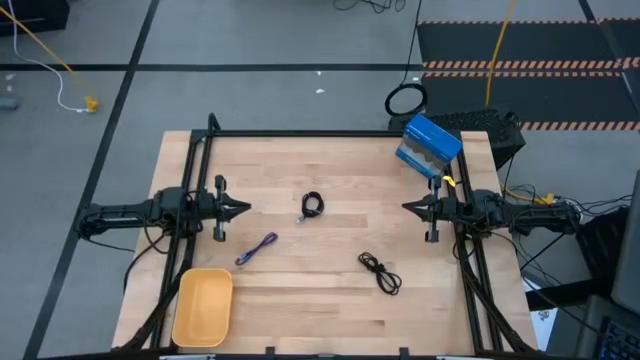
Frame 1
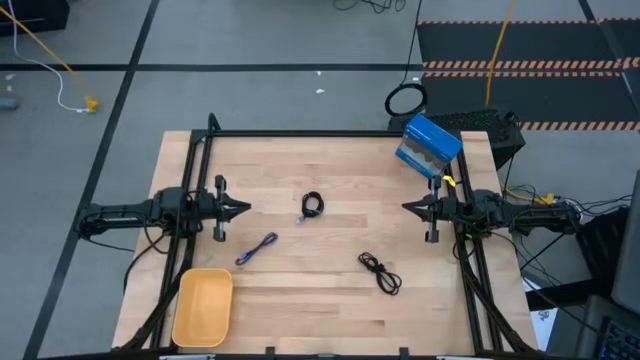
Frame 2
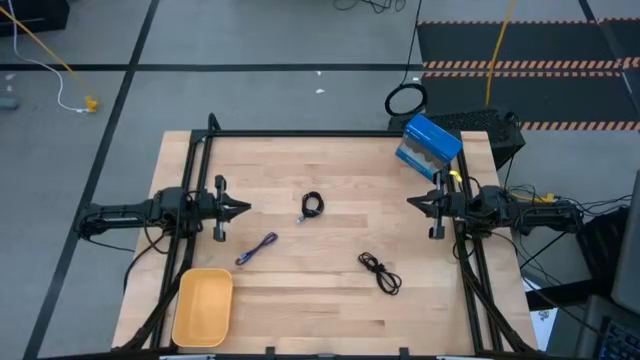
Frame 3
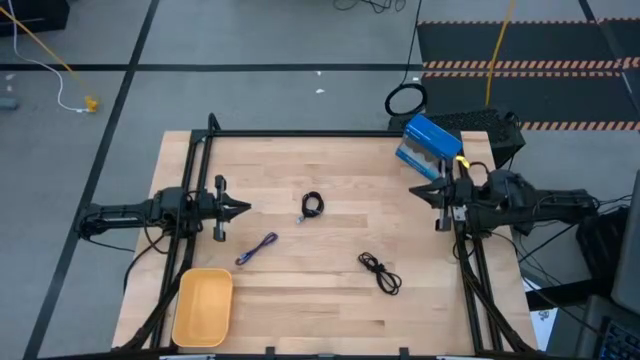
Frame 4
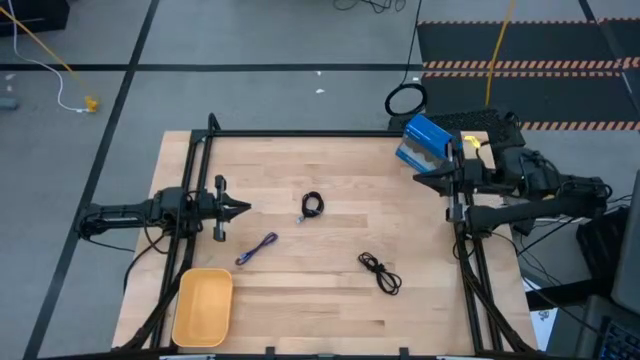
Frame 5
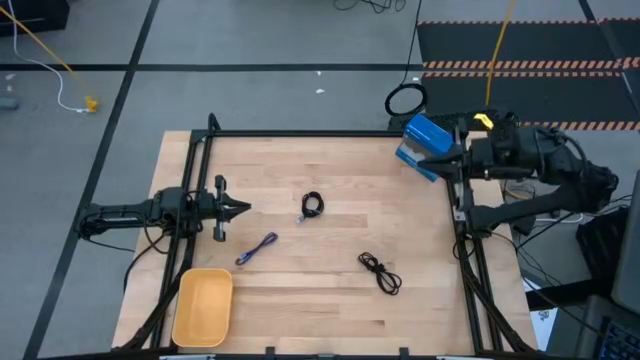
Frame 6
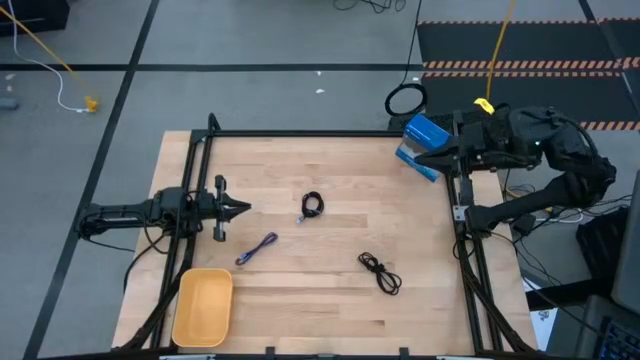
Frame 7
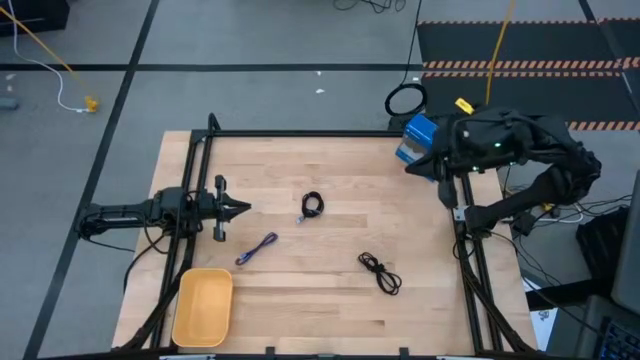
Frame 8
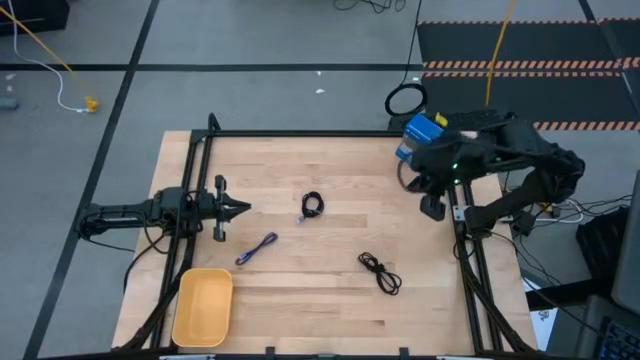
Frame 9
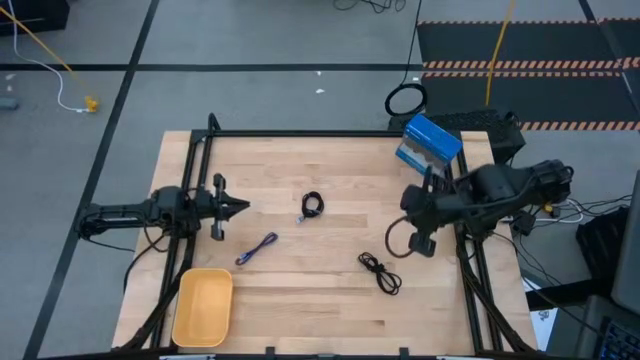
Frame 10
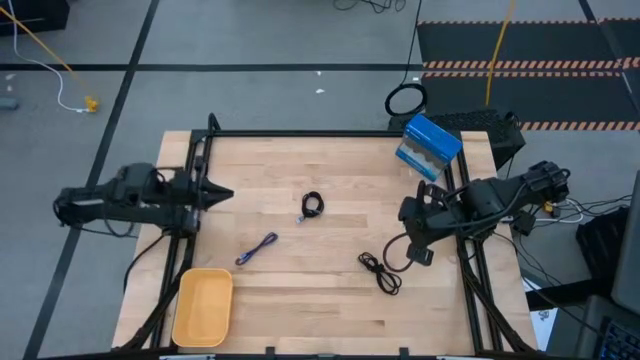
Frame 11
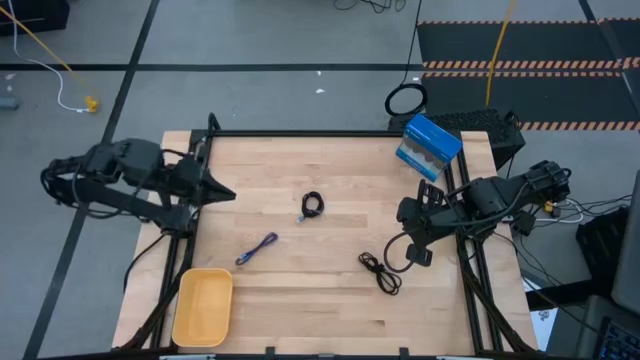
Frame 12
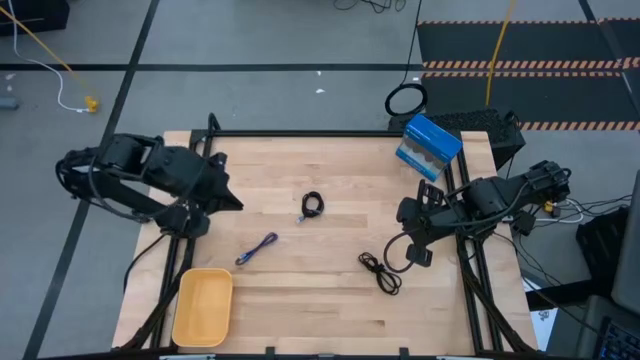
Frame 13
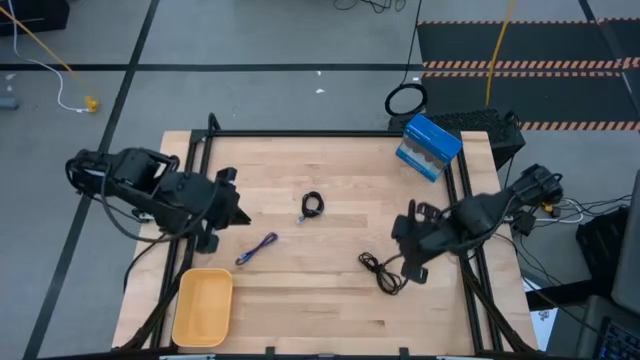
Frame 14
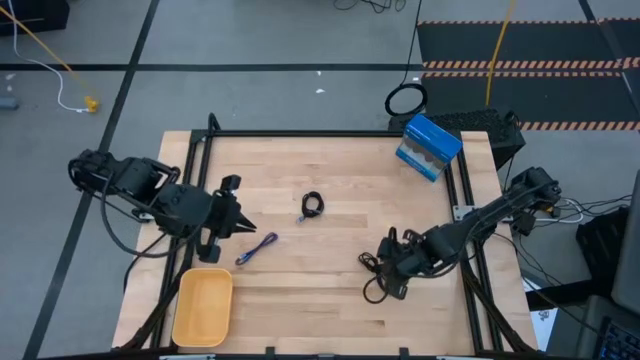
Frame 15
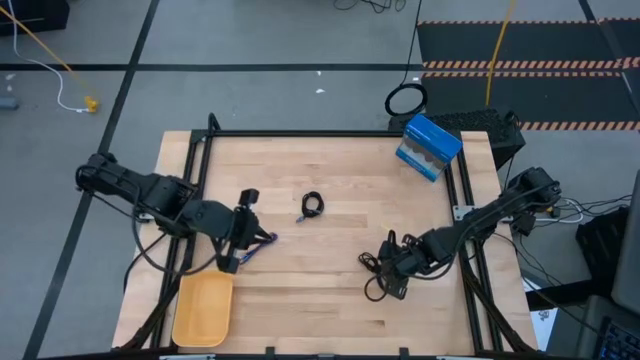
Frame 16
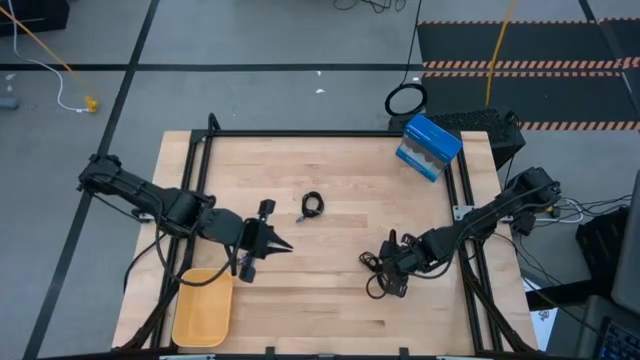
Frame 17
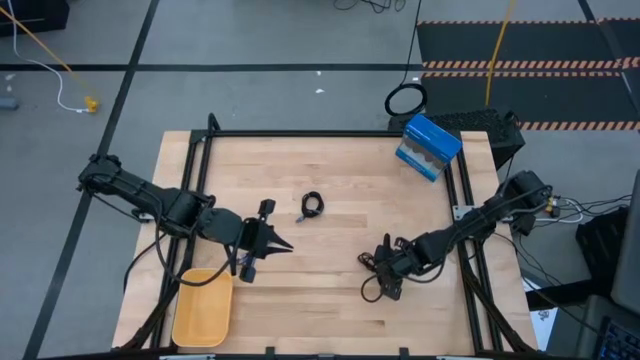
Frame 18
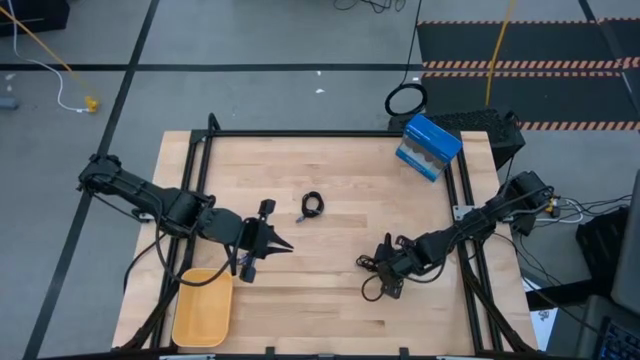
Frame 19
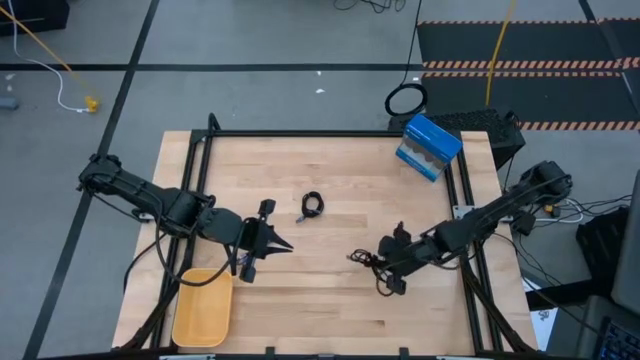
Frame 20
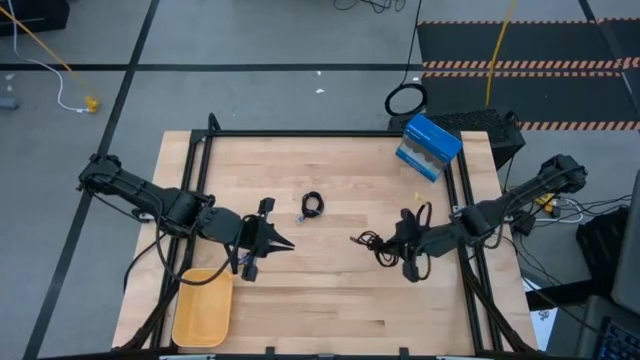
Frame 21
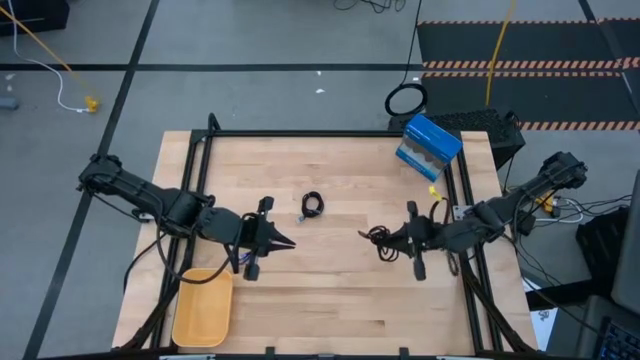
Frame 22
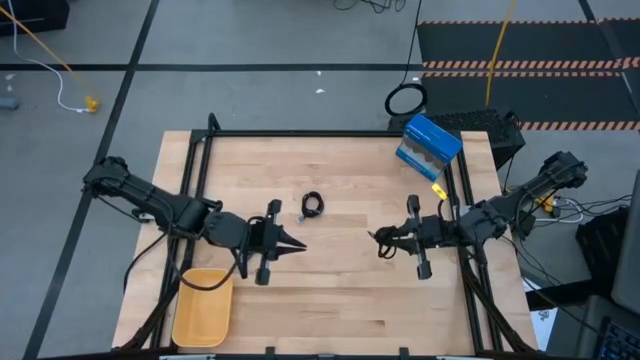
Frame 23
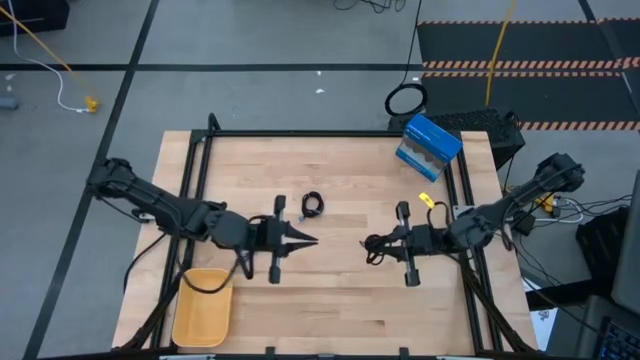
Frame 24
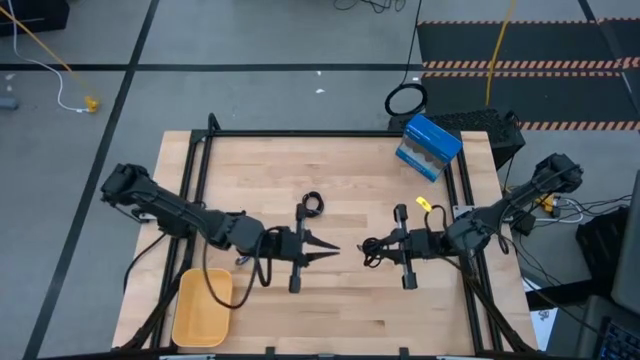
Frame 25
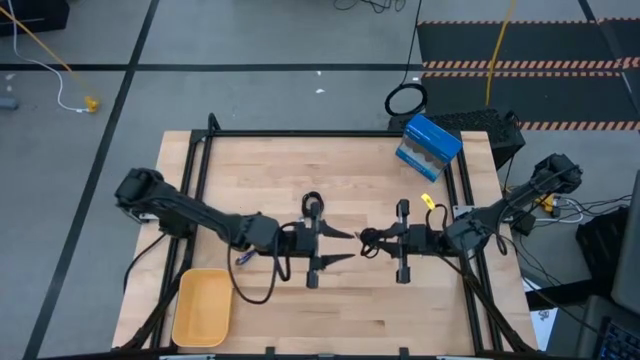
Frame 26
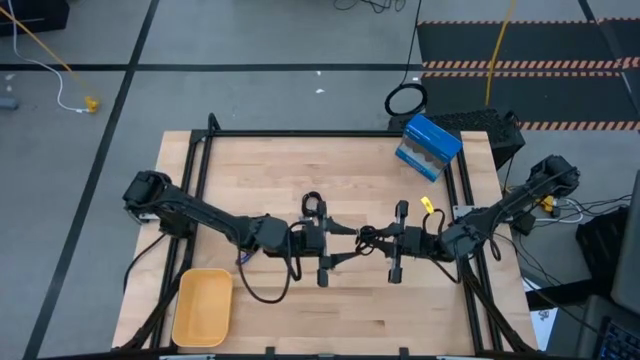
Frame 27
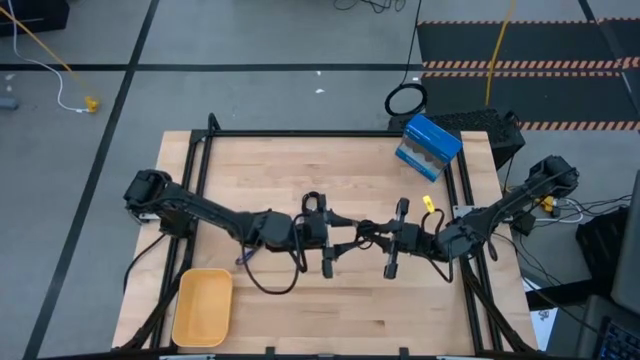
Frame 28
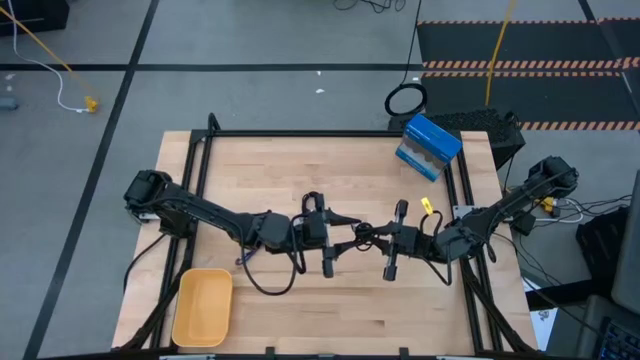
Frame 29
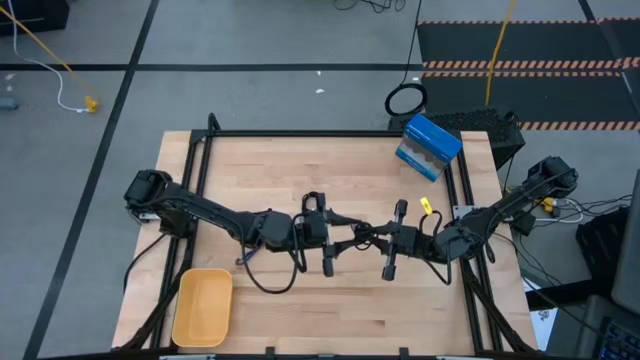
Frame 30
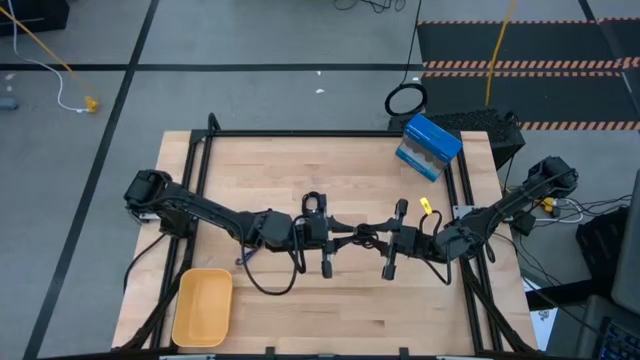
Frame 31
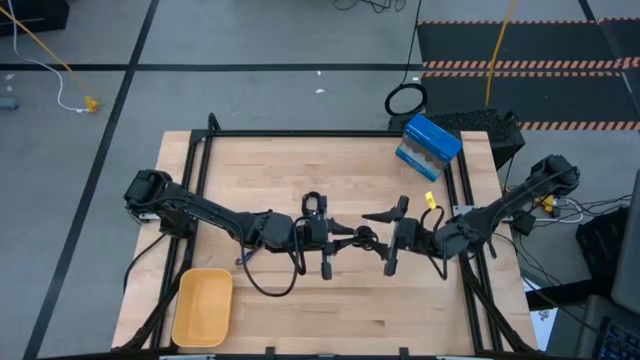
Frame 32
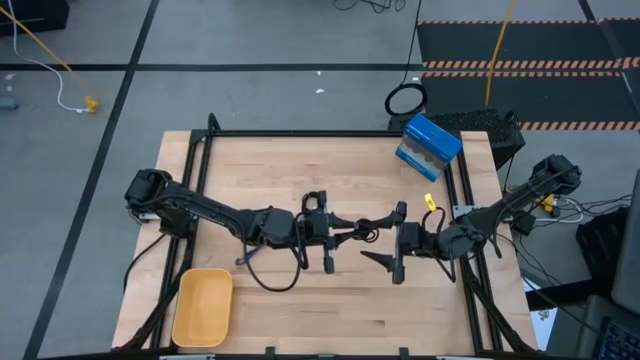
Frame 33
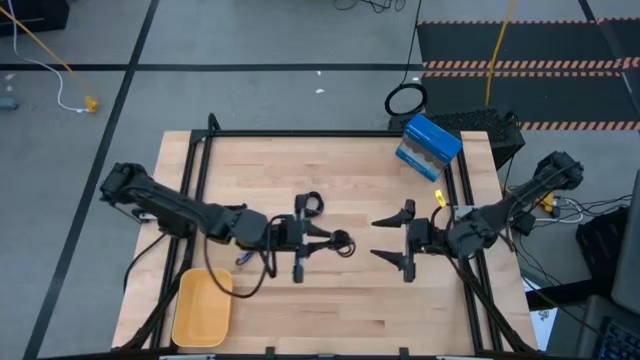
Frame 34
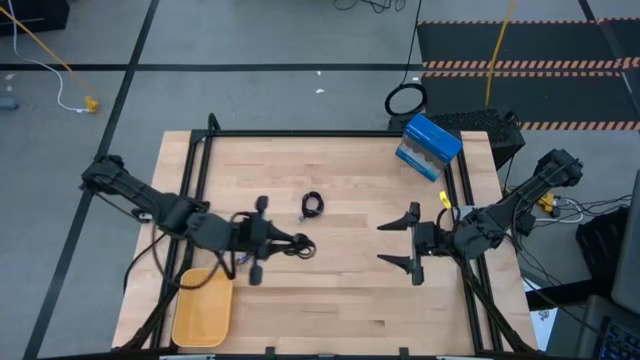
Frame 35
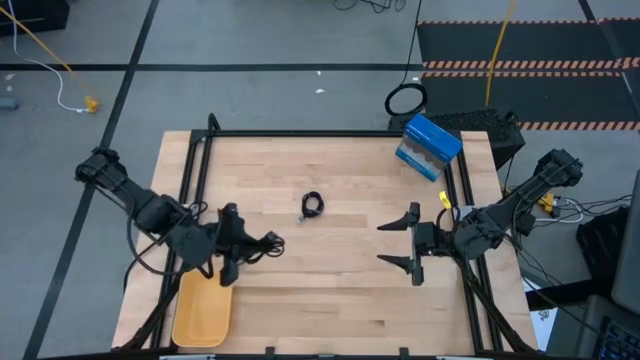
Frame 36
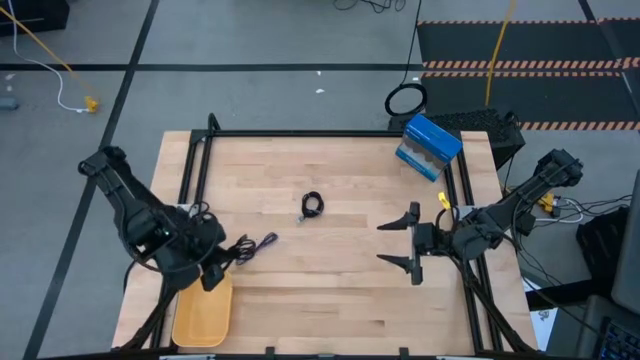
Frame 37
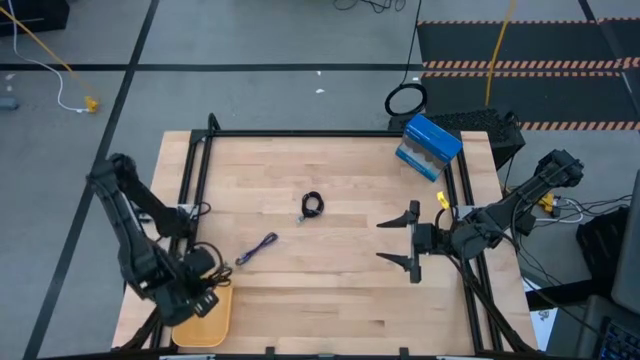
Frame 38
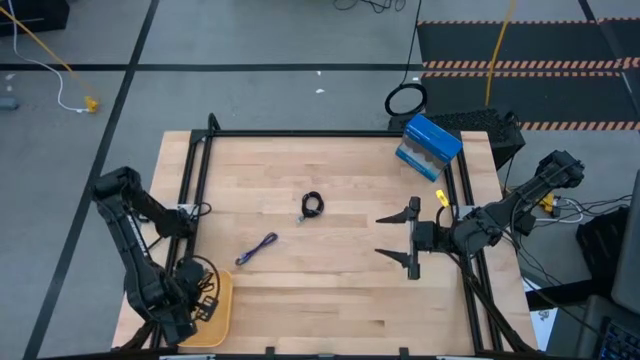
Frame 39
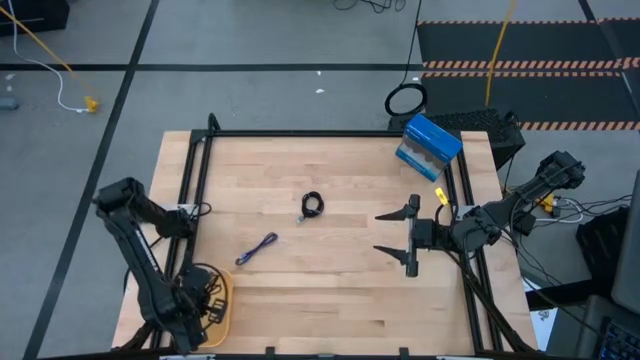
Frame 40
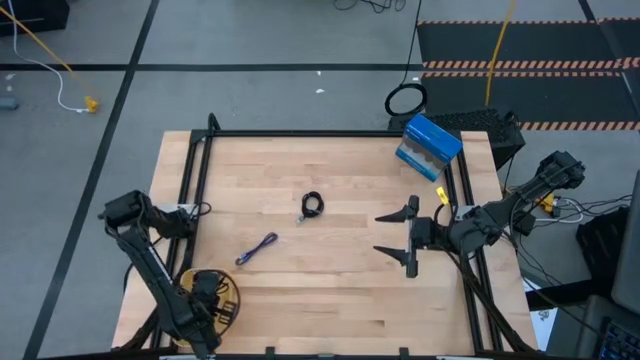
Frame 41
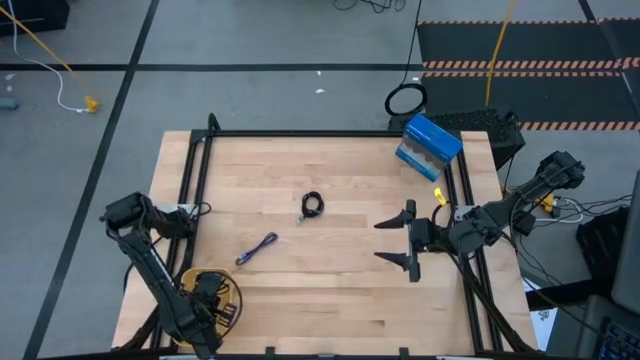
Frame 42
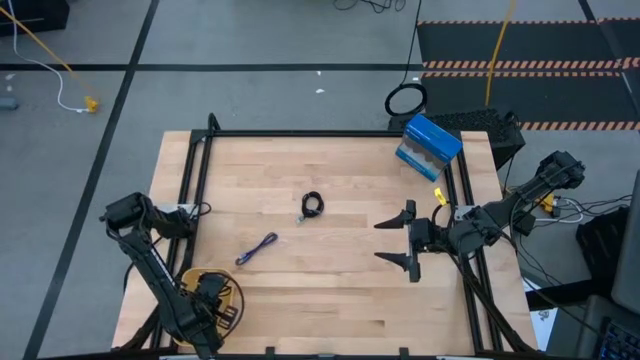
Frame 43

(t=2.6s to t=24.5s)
Task: Pick and place USB-C Cables
Put the bottom black charger cable into the yellow bin
